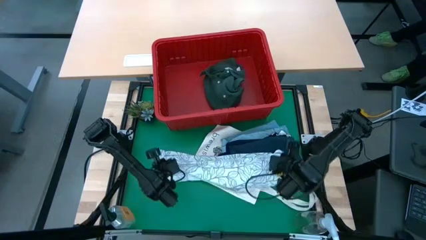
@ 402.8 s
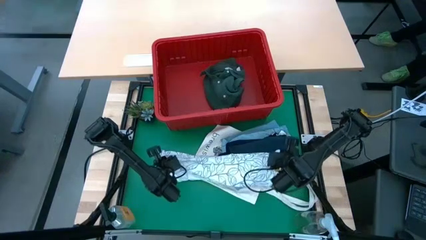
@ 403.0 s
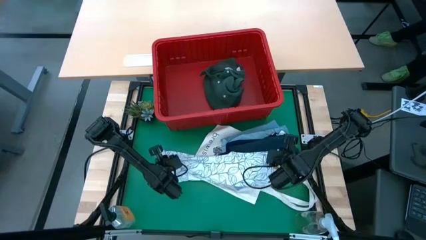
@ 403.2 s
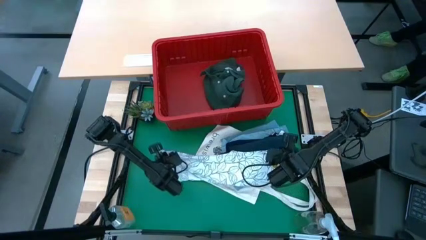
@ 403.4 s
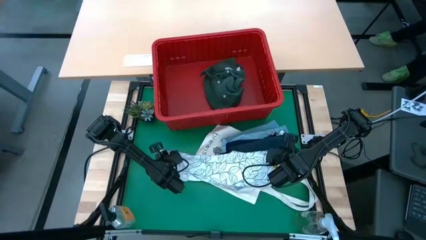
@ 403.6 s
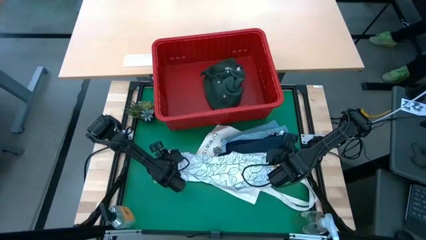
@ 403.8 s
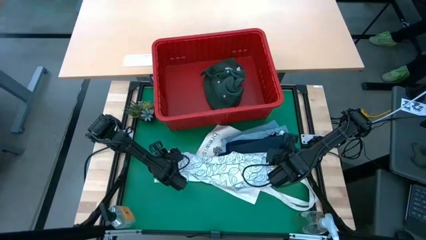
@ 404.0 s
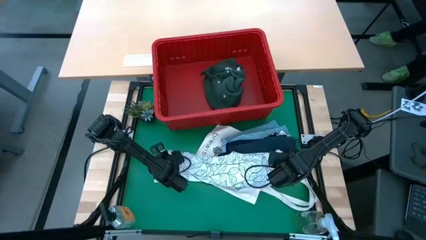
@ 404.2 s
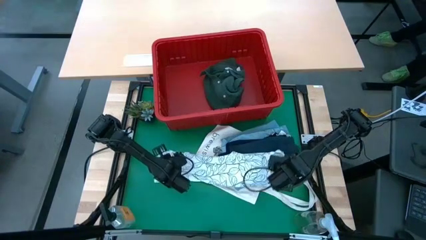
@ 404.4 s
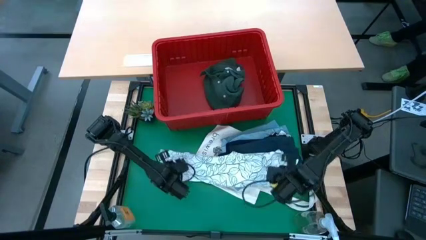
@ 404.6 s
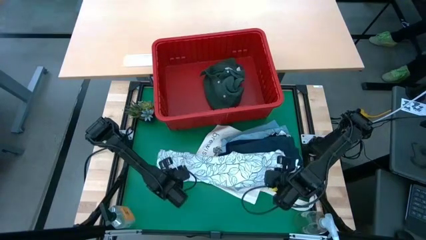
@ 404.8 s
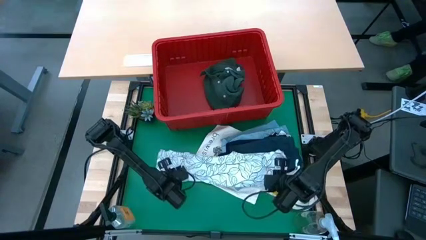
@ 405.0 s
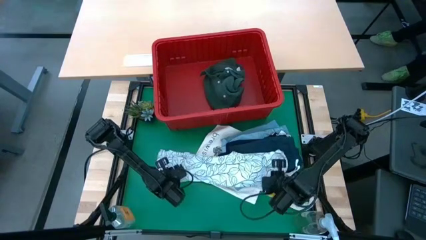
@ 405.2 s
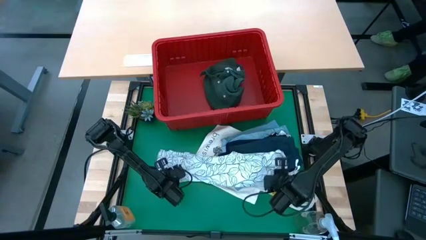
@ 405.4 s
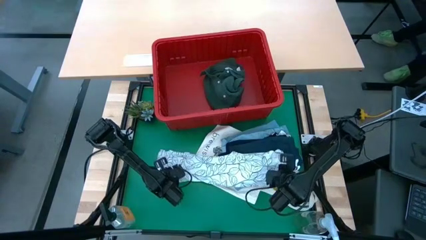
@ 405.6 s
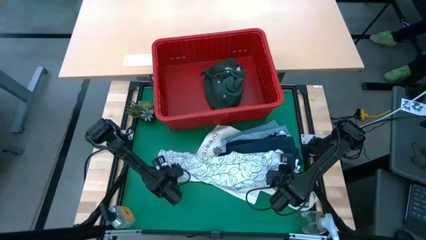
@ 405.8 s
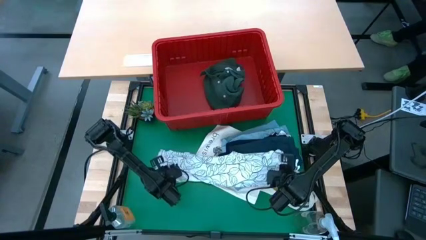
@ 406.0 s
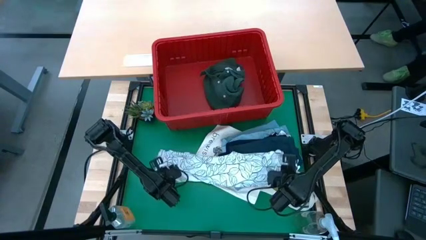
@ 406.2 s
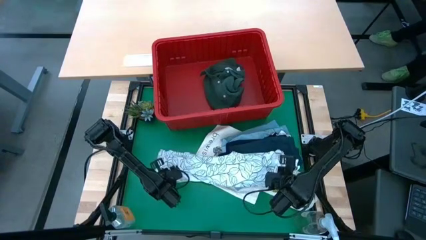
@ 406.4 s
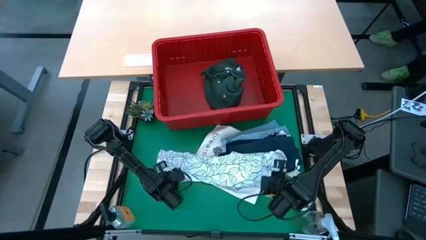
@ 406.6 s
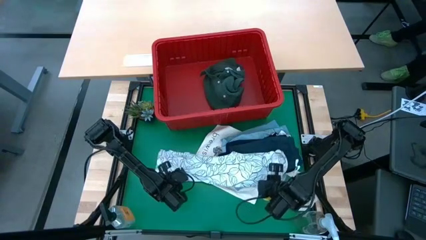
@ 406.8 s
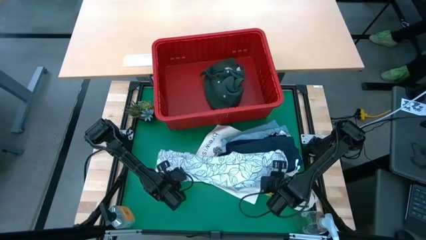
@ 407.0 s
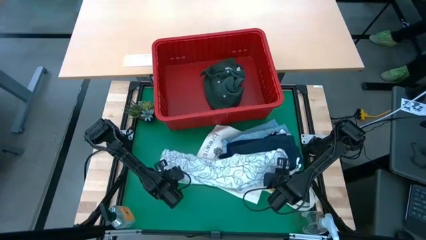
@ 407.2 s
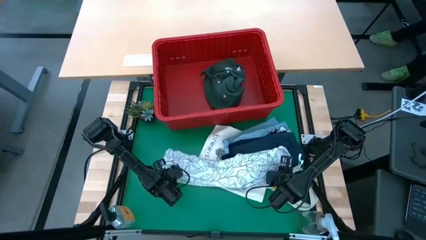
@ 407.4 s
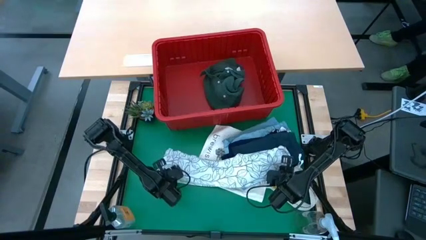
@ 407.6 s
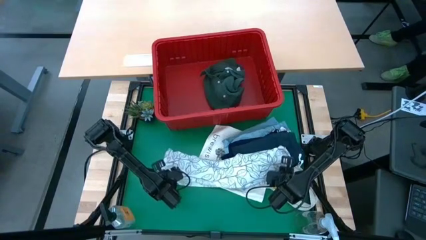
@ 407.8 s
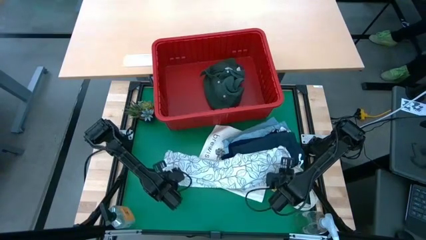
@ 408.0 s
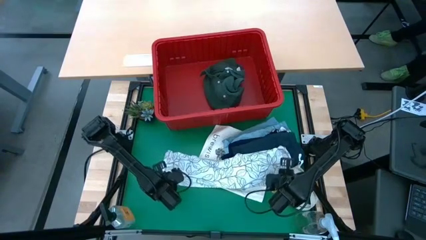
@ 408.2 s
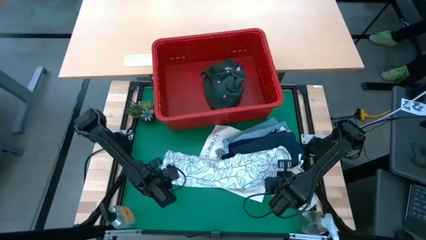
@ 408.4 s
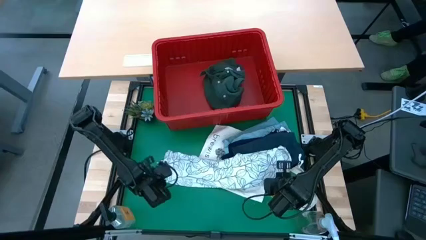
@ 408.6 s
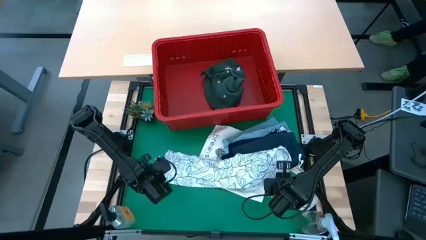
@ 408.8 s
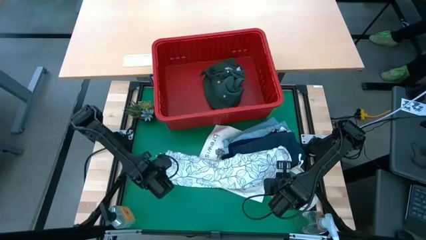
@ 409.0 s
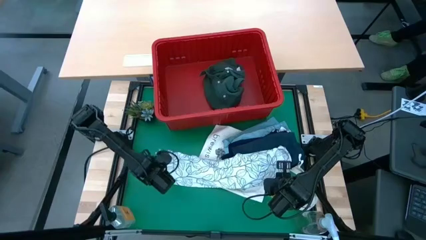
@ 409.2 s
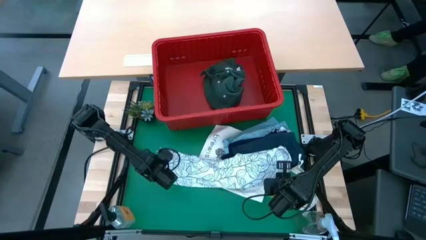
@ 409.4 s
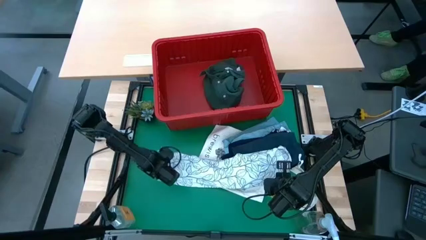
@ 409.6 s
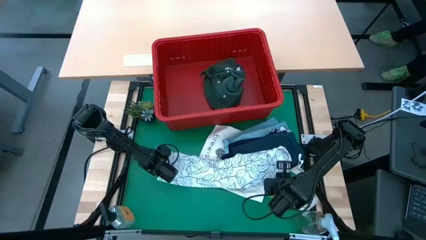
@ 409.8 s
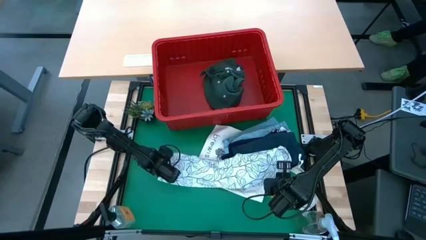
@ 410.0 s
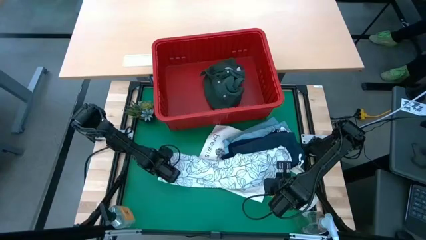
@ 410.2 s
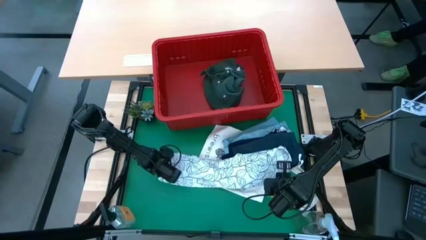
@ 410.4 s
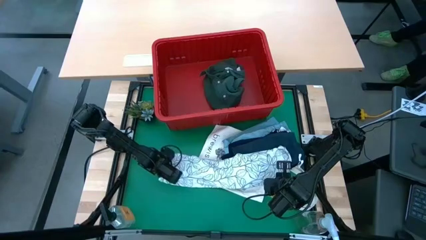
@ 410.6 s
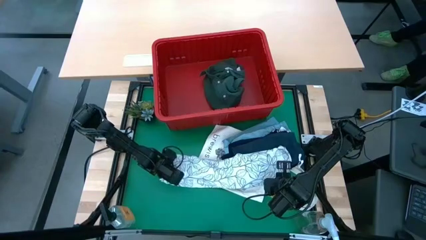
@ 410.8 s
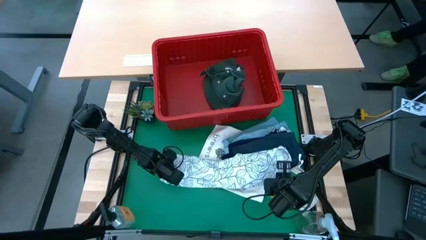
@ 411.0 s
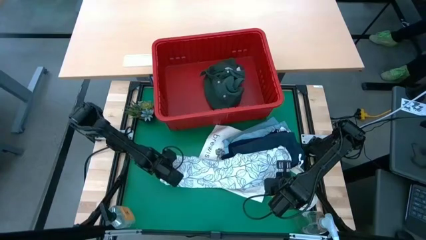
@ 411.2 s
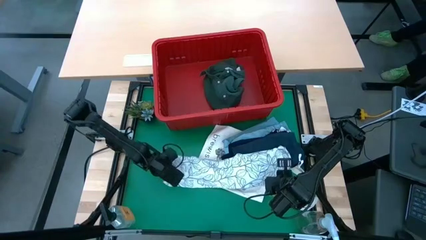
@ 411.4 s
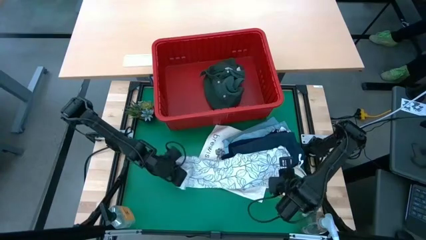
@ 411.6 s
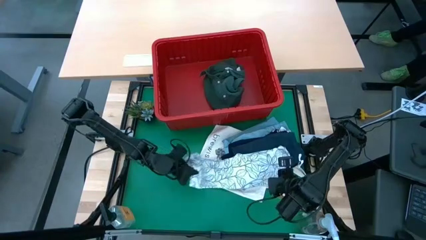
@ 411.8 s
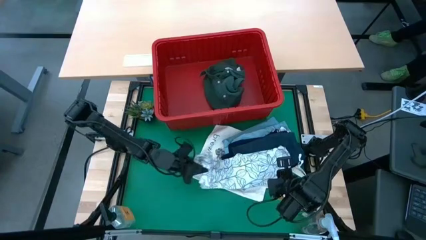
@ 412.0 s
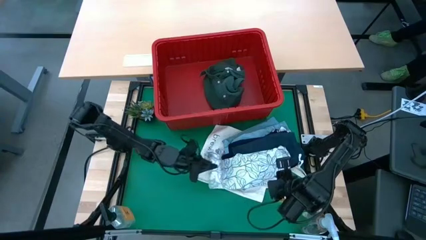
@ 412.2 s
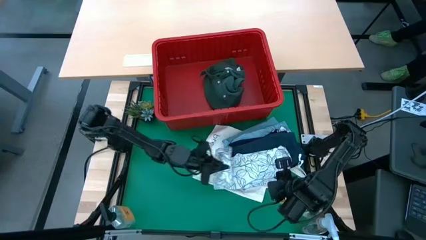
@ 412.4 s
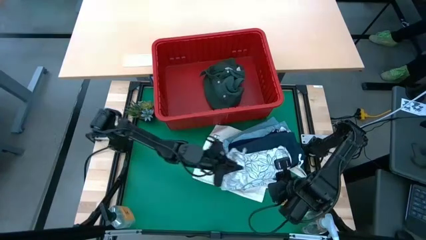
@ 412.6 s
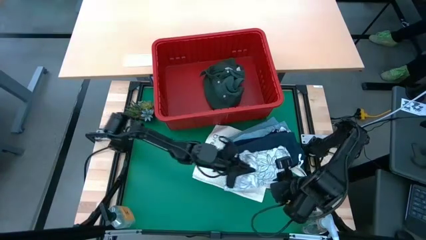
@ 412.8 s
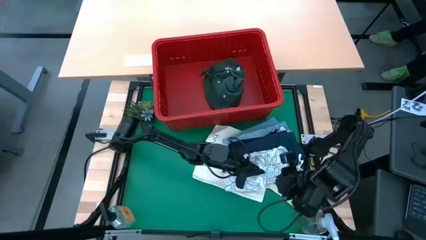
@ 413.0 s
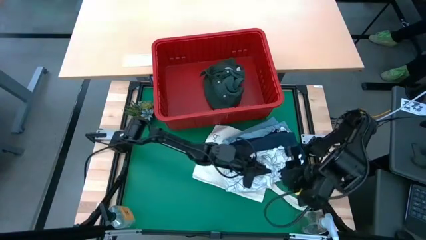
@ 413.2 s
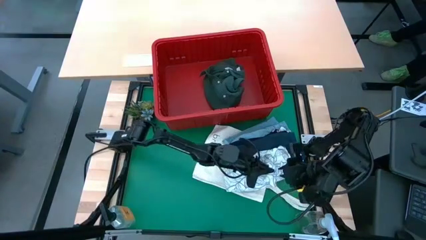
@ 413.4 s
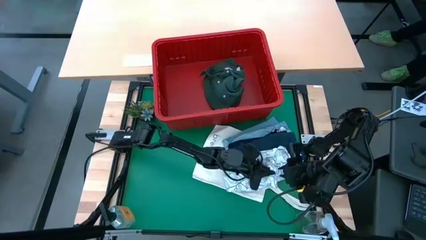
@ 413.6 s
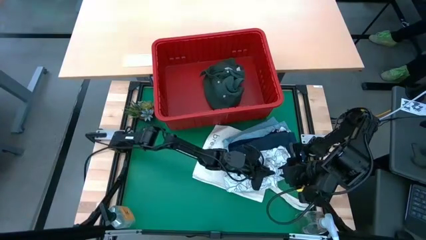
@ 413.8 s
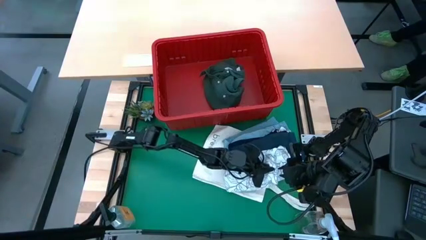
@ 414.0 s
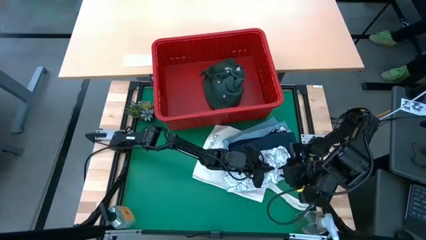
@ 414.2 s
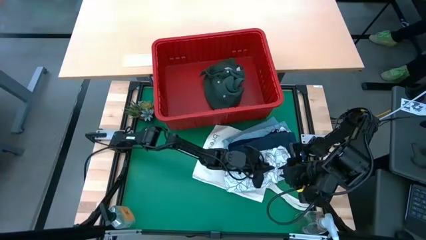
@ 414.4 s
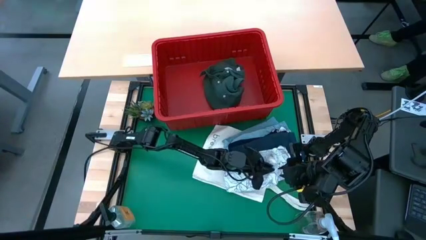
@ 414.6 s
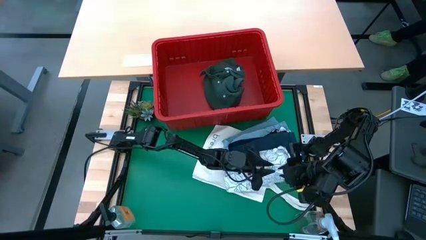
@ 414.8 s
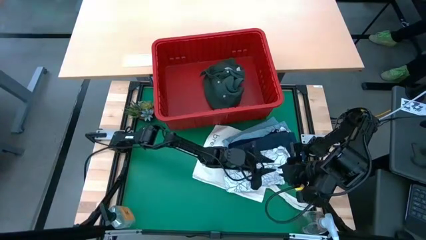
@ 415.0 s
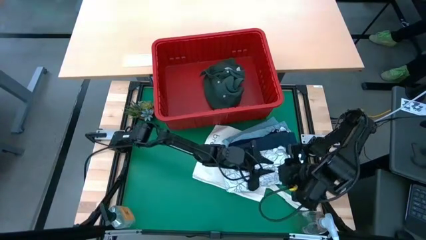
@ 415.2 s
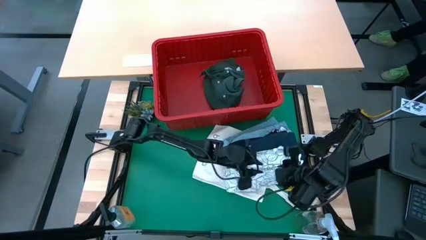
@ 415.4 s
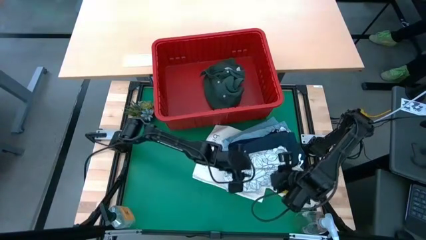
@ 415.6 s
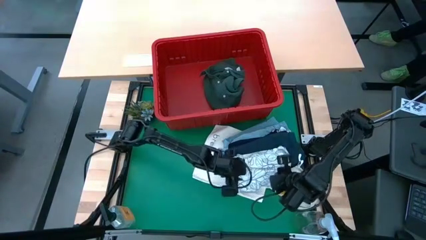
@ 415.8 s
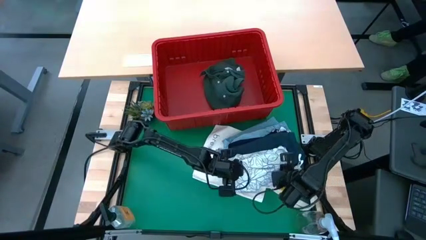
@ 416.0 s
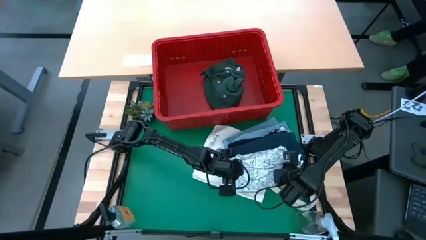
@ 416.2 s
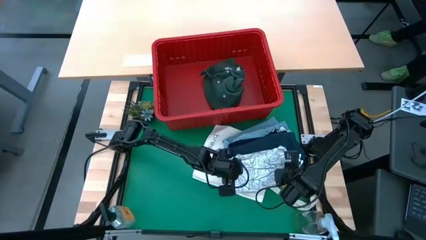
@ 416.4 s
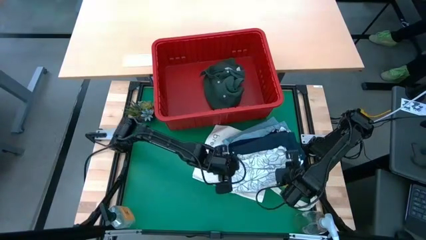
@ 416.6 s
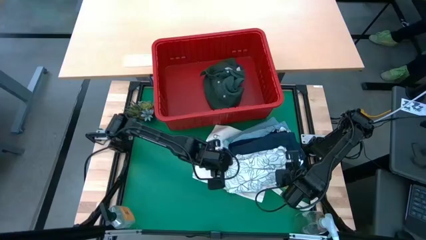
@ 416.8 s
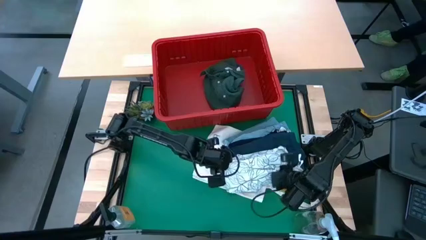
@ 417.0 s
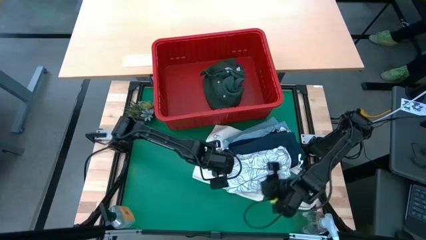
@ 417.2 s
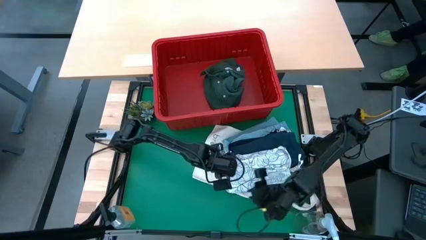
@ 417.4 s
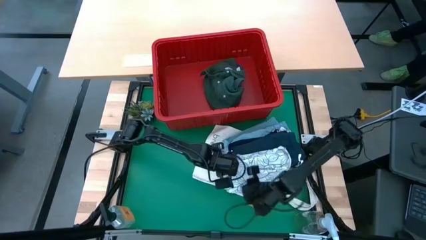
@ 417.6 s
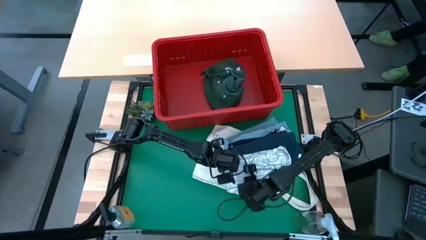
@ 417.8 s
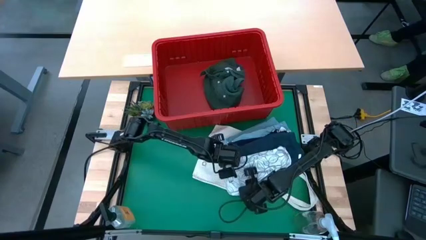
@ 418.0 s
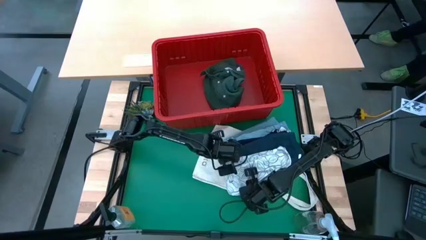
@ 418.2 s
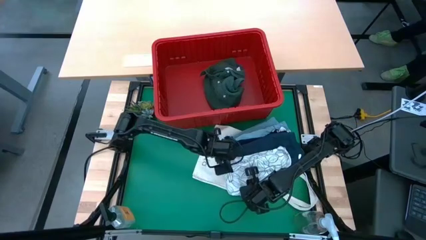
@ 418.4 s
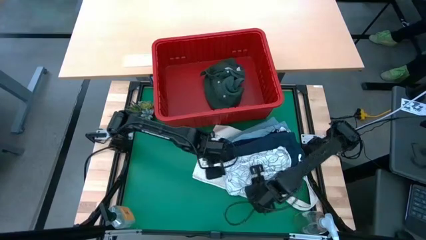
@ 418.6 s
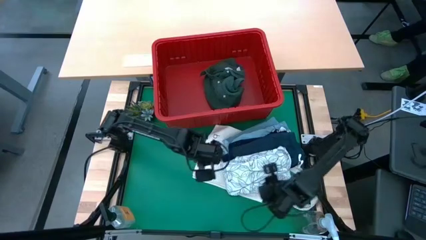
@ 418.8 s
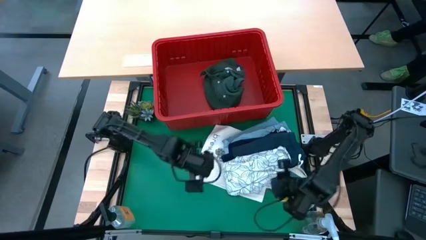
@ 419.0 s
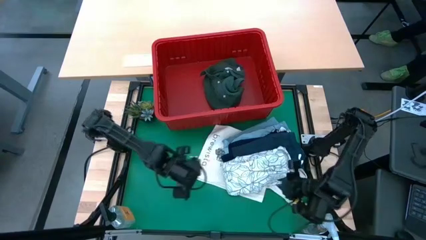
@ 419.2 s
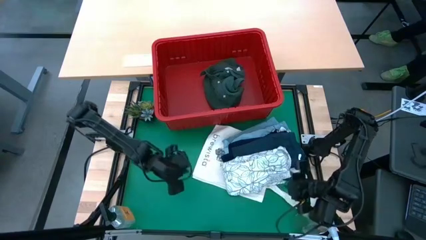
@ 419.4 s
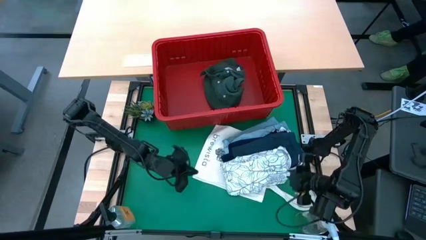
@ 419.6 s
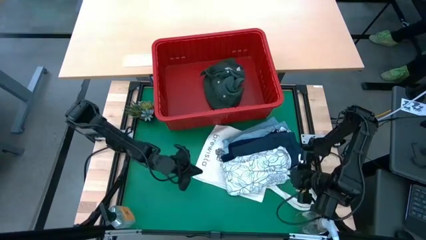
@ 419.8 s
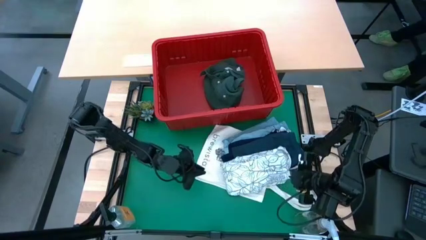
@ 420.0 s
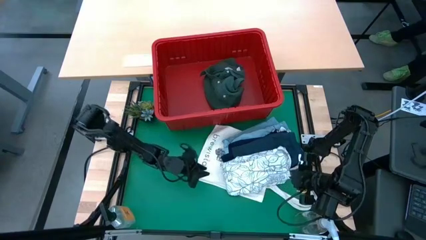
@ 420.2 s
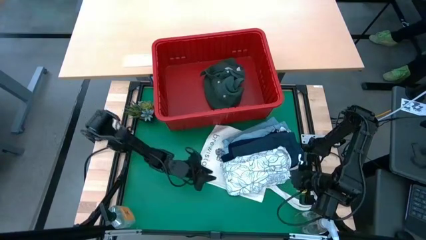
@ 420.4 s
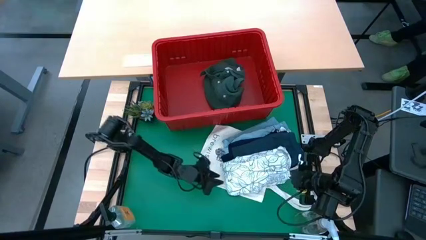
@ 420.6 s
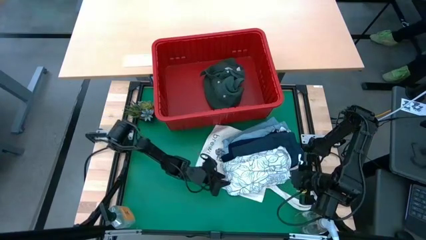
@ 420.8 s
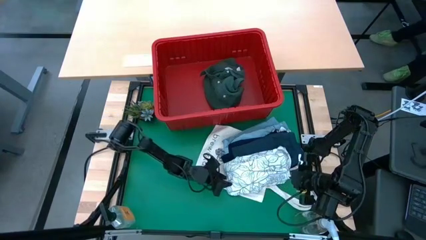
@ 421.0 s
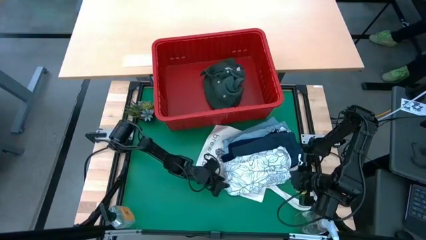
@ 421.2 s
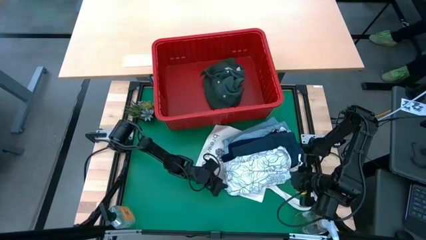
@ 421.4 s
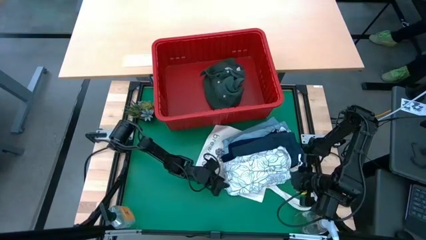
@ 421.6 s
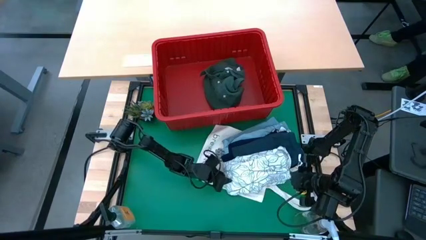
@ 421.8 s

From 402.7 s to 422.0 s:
Task: Fold laundry
Fold the patterned white shirt
